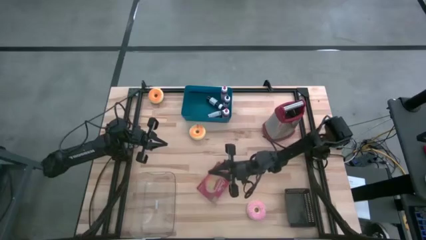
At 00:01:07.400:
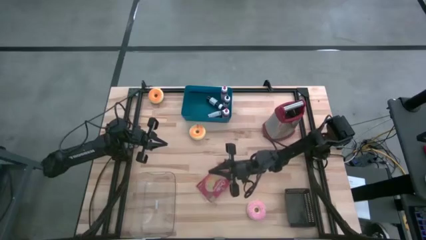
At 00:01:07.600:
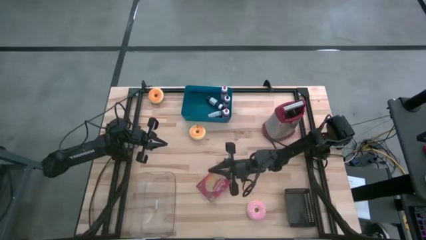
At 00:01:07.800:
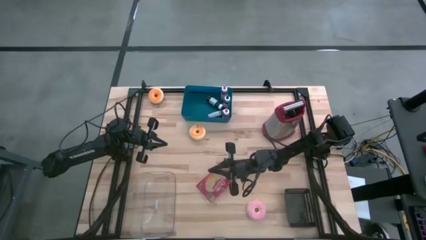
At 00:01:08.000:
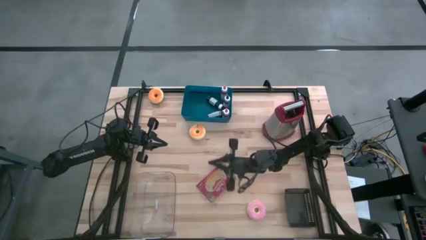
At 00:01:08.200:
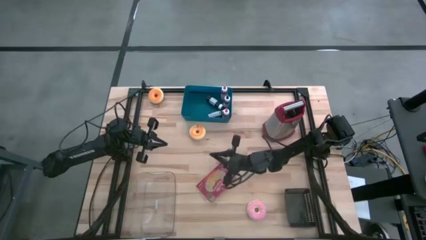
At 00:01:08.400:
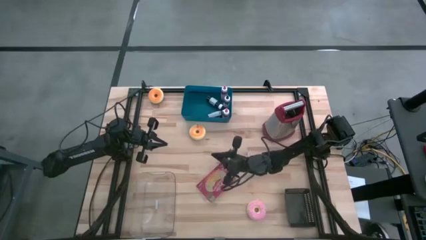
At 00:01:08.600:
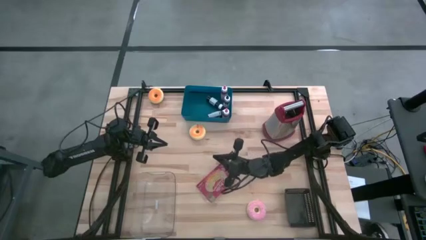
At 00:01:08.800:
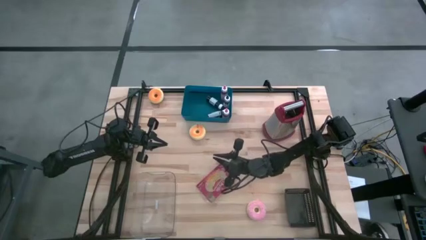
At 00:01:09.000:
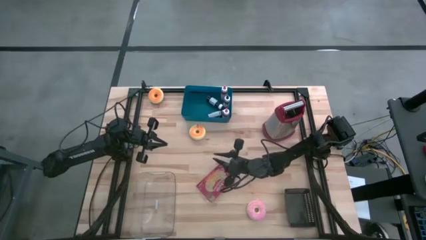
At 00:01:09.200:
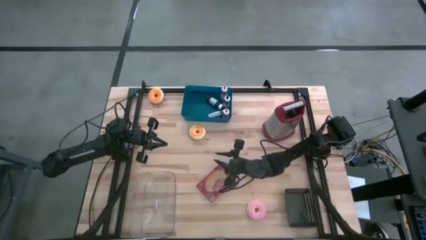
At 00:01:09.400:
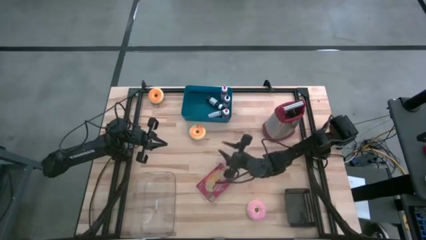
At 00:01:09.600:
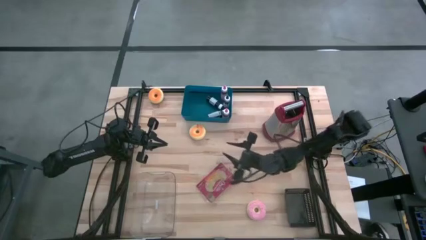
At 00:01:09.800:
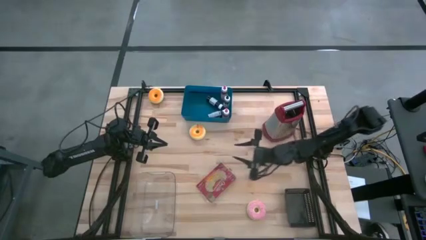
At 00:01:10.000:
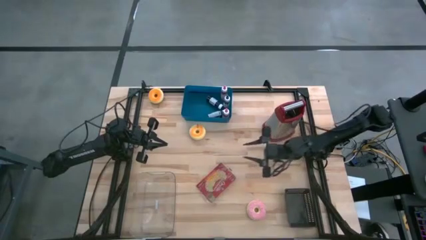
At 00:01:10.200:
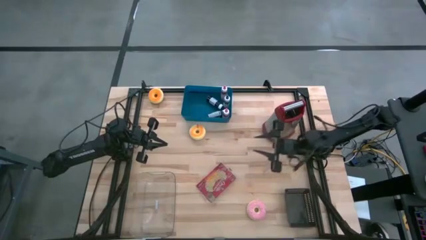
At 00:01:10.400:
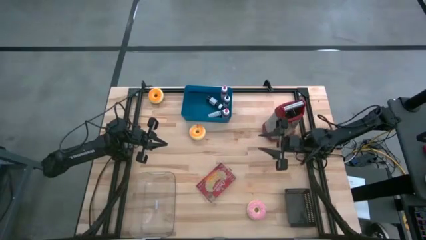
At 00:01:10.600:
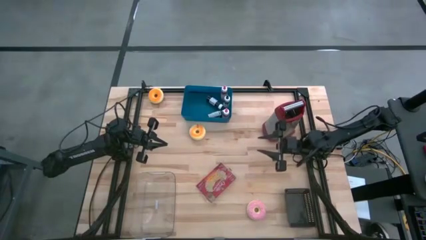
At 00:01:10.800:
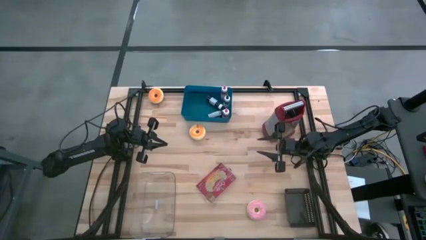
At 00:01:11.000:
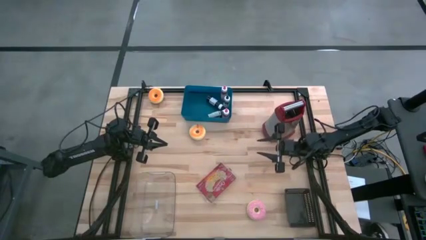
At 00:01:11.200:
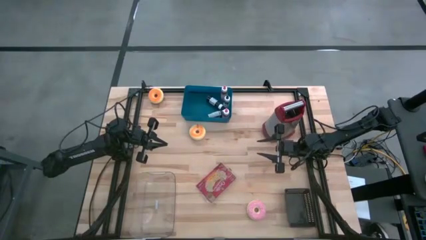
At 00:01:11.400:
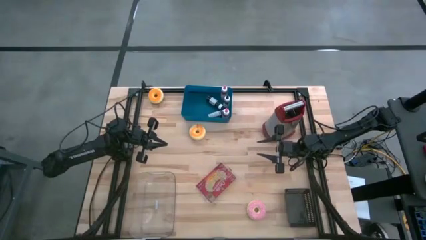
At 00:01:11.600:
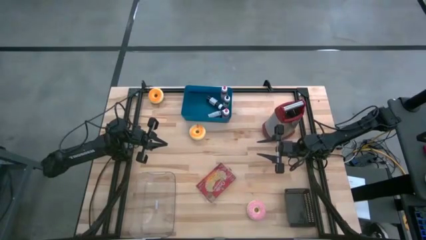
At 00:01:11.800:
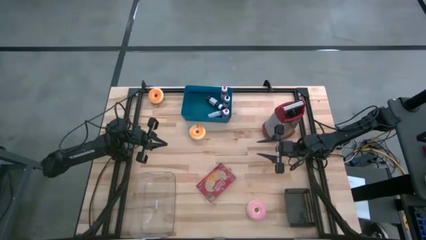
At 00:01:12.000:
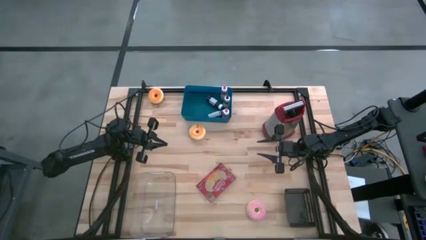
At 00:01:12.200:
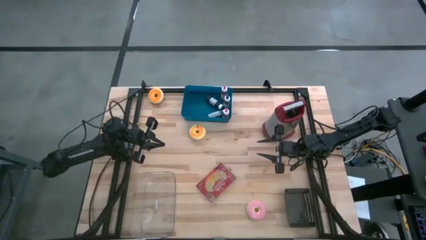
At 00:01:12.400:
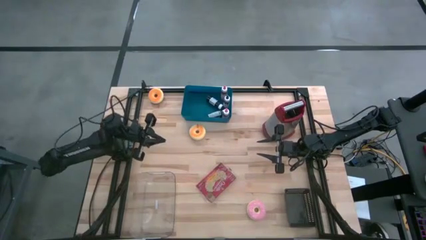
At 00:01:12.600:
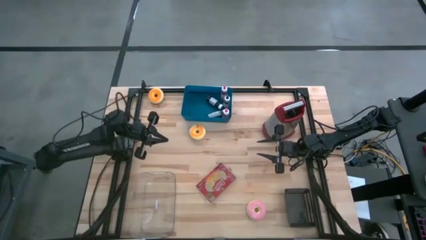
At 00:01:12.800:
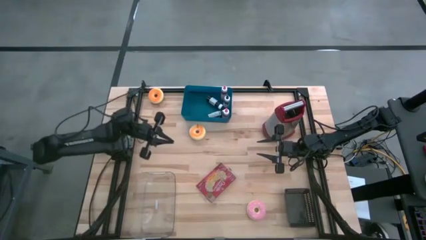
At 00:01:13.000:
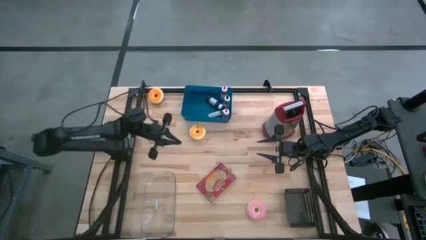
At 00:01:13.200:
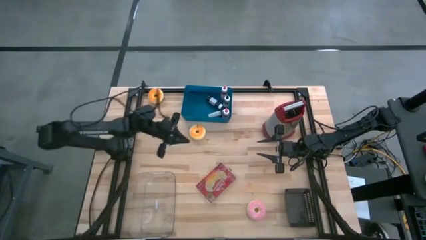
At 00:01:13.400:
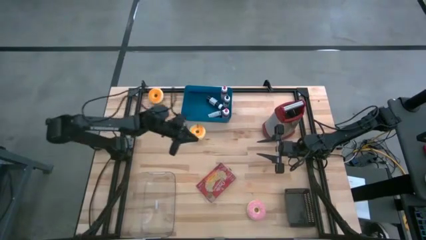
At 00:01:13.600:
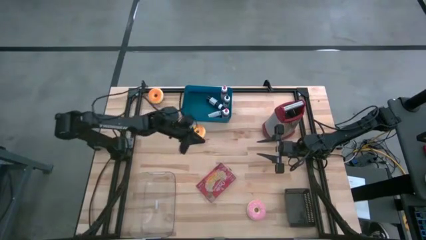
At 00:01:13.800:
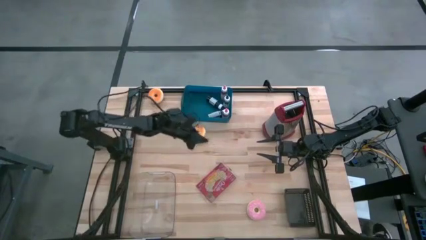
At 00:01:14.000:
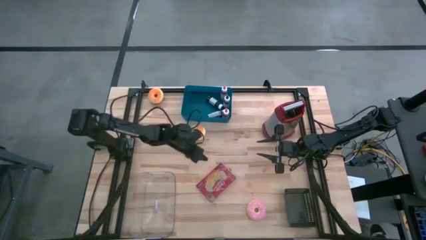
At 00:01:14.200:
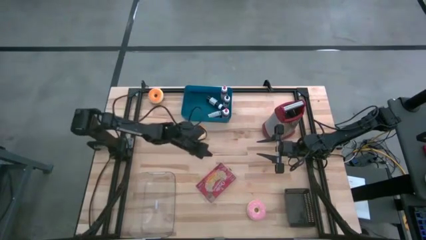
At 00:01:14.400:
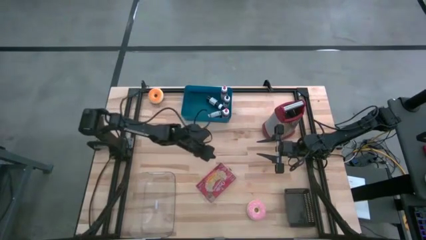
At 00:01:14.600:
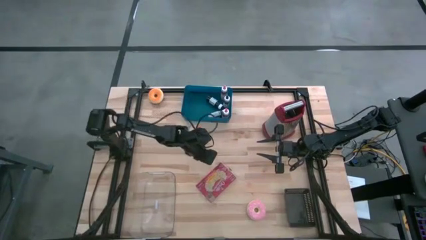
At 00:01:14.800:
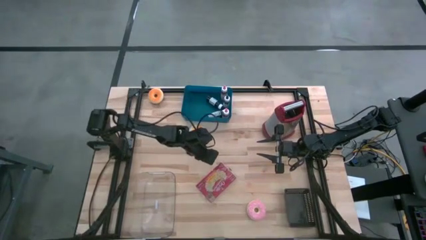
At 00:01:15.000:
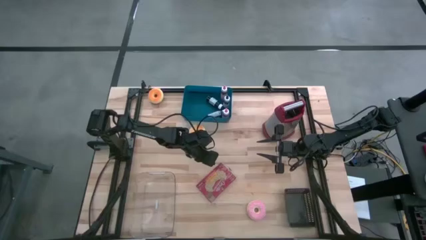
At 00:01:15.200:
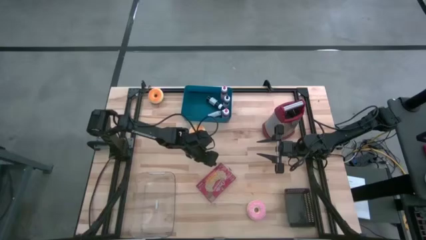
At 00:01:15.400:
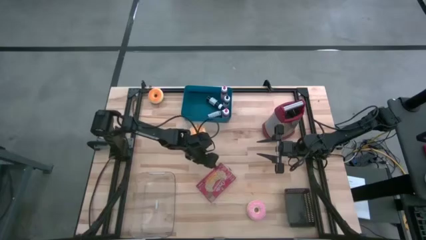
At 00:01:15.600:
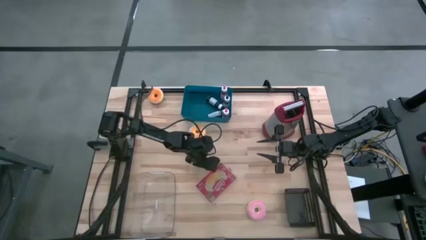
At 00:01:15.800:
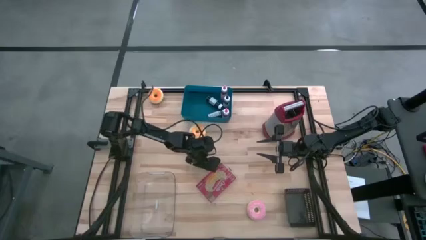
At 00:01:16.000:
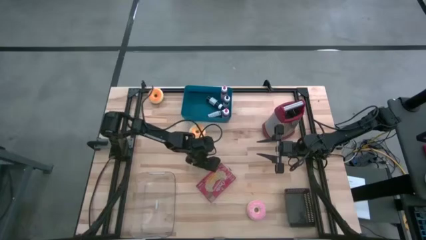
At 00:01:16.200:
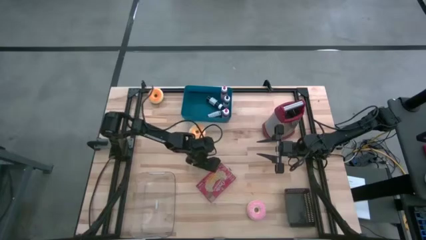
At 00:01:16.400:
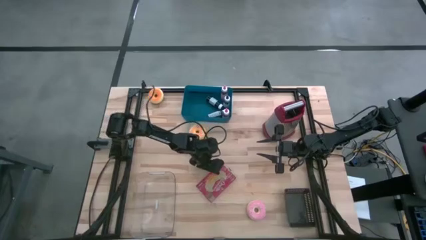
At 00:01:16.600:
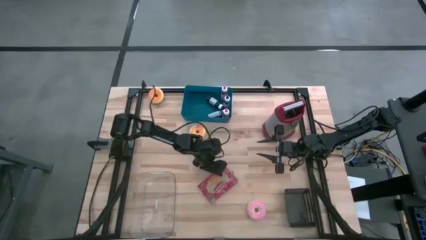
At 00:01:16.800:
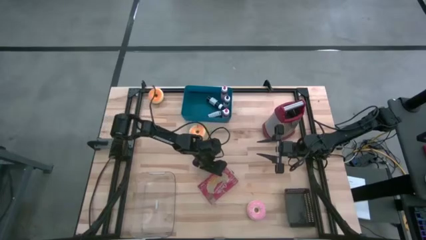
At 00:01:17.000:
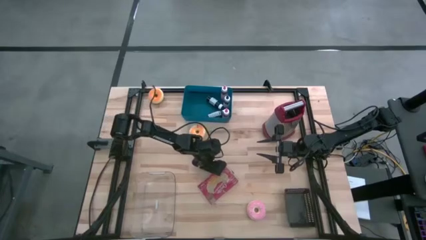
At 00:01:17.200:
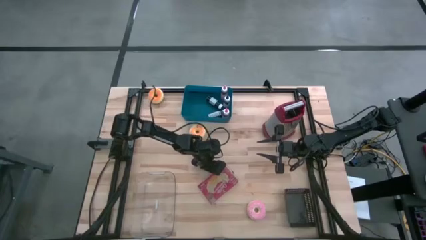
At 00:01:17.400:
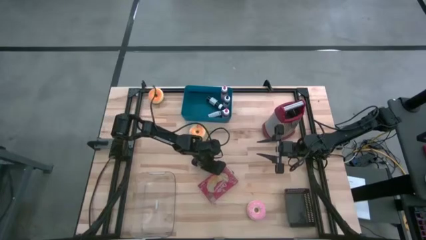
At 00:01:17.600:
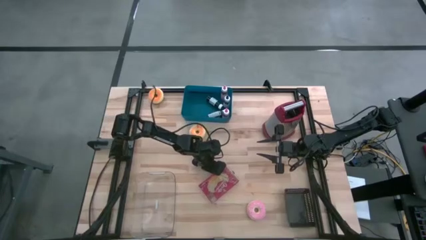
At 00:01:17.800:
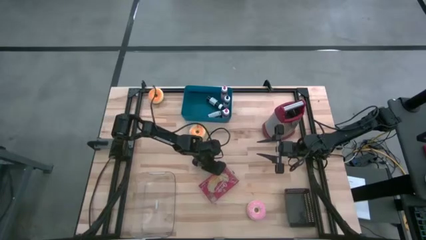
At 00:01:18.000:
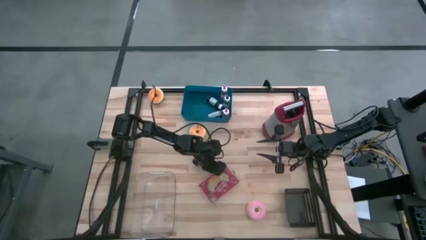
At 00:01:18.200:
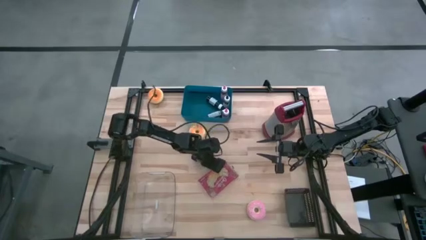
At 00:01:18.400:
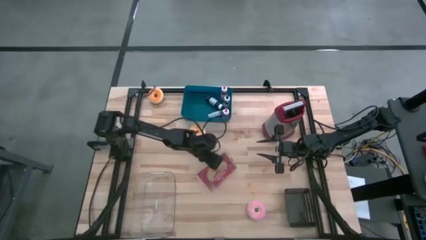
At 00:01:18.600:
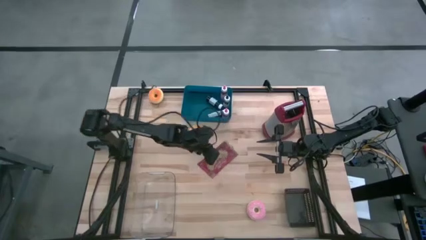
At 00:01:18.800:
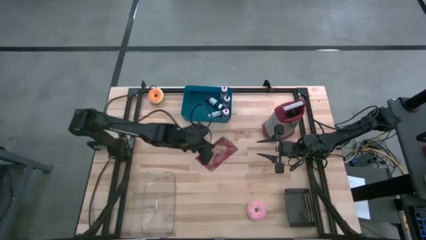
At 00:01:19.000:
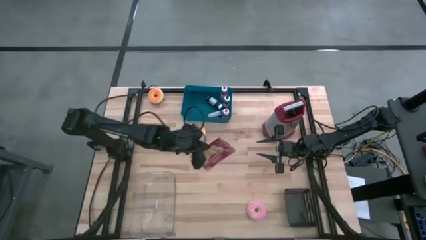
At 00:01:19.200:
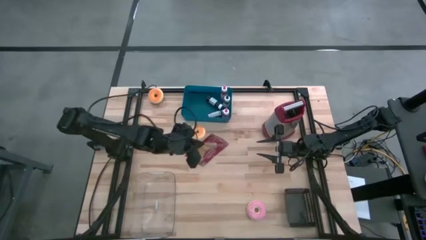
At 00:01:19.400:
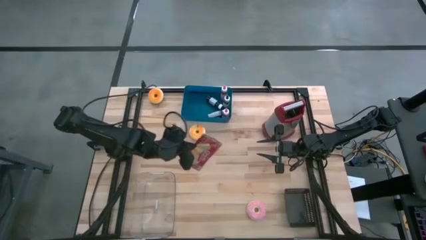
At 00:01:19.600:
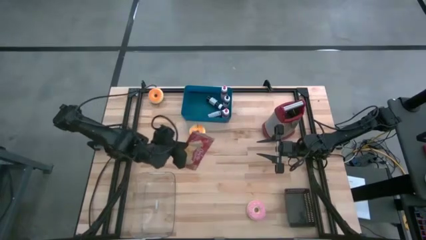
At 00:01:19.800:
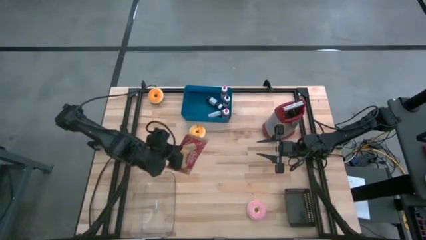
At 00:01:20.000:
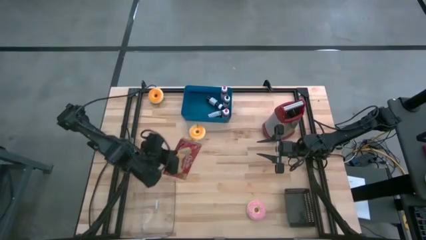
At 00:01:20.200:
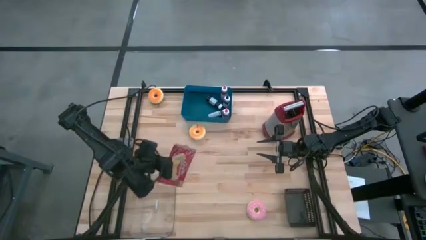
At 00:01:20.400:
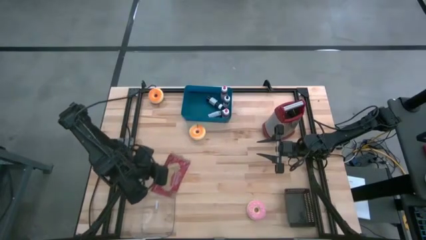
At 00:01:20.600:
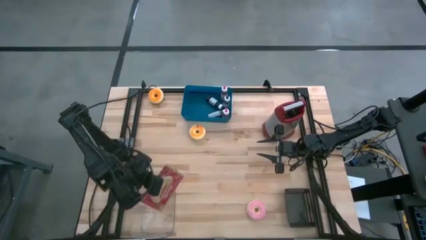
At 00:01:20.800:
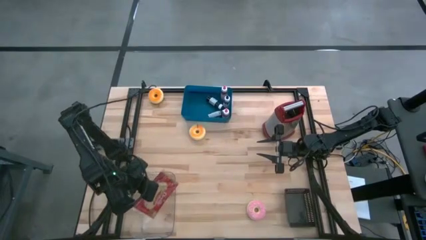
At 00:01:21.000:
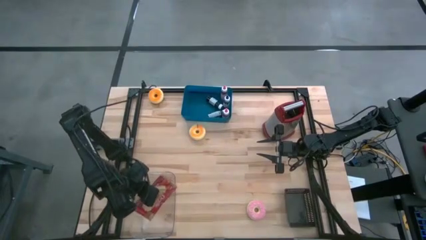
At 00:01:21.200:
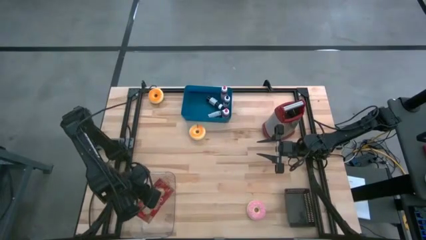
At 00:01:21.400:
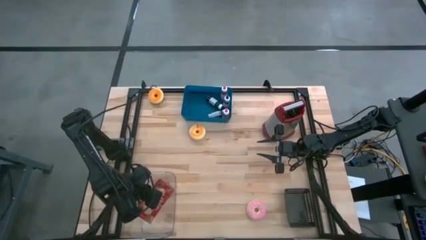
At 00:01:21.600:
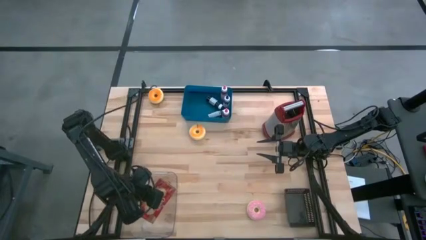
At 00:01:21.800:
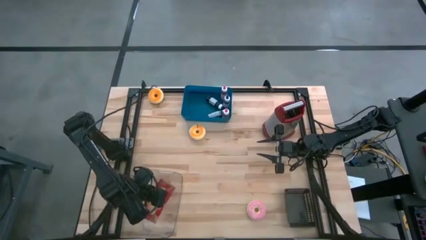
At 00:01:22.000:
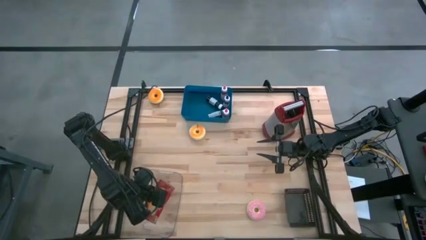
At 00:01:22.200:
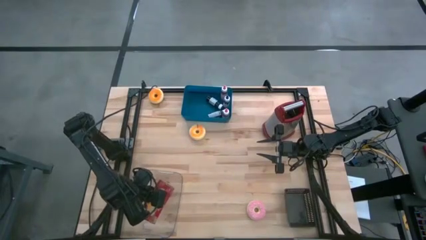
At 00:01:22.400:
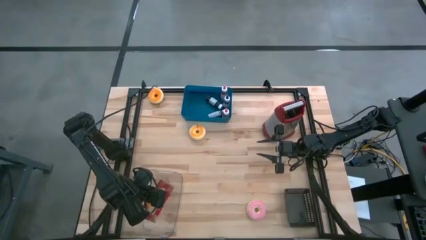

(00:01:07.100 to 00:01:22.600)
Task: Pick & Place Food Item
Put the red popcorn bag into the transparent bin
